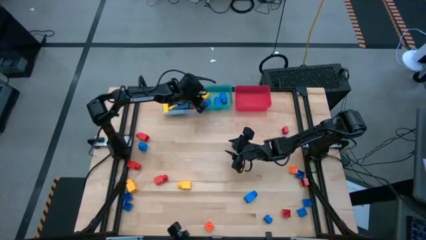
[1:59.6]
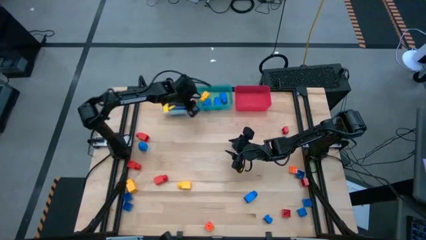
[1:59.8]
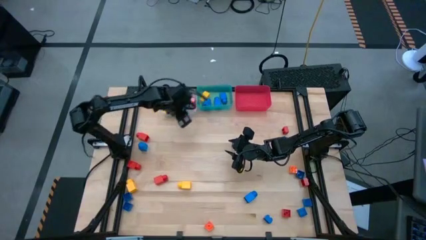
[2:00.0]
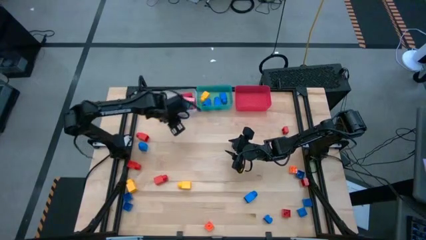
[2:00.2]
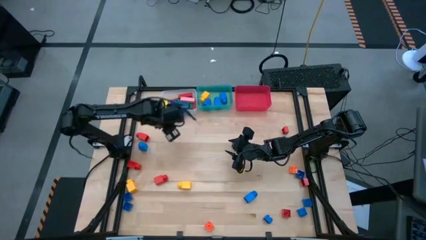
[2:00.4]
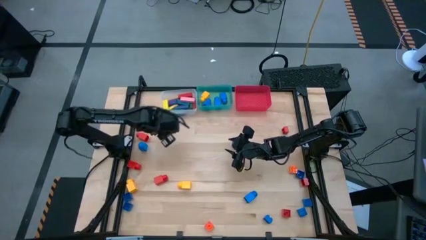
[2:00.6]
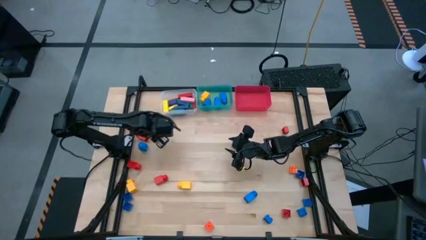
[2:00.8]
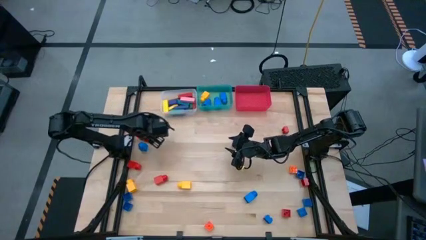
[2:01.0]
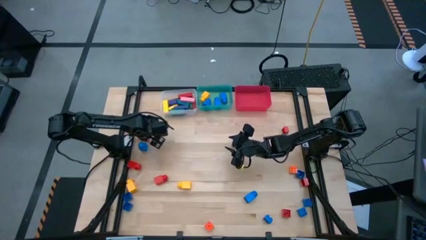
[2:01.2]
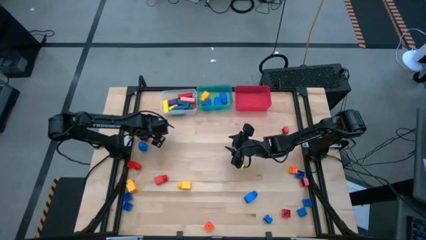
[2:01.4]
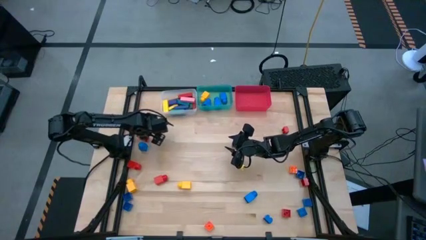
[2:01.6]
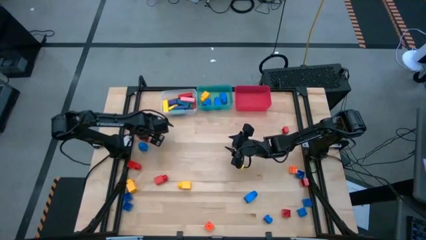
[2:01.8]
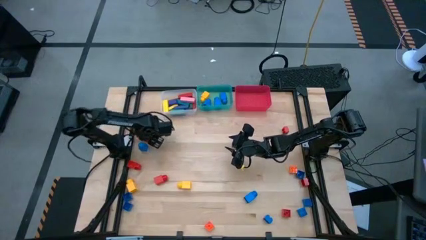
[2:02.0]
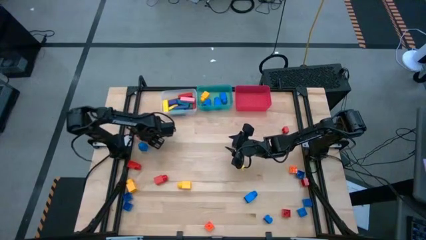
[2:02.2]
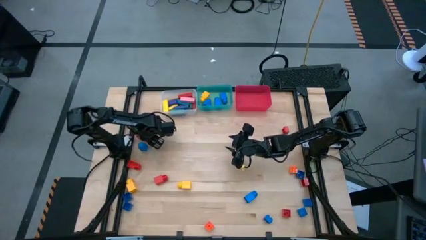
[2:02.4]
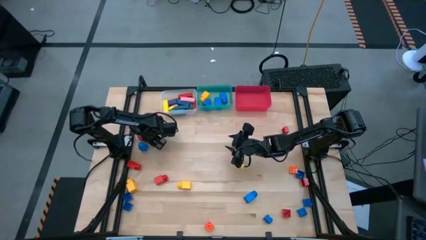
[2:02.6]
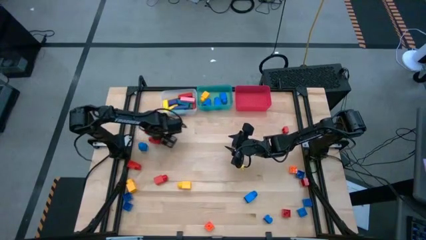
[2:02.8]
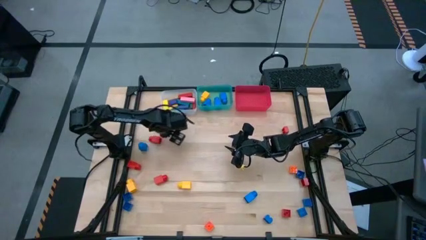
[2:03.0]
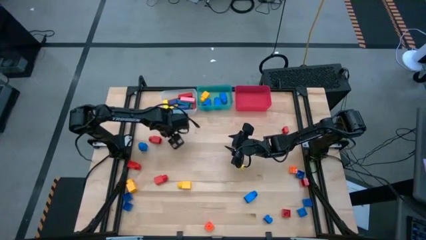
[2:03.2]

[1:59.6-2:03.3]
Task: Sort blocks by size
Put the red 1 stud game piece into the green bin

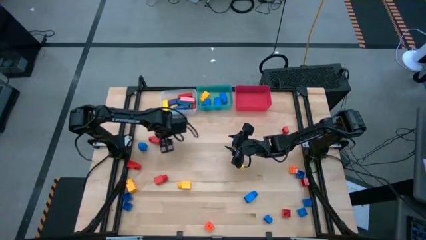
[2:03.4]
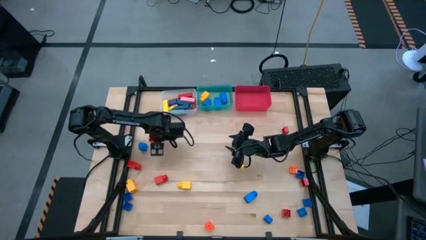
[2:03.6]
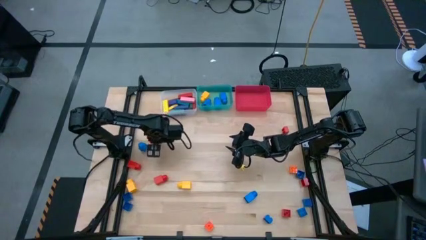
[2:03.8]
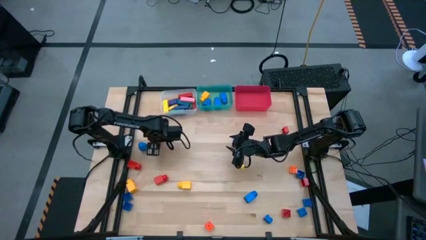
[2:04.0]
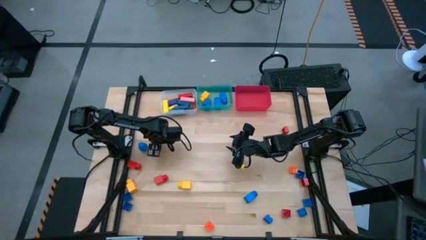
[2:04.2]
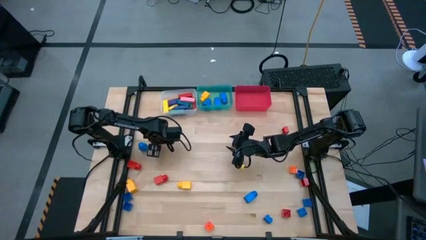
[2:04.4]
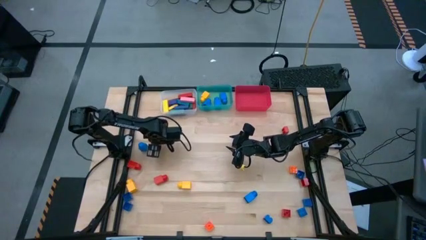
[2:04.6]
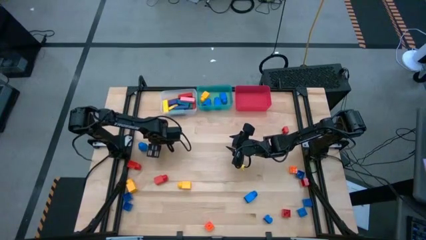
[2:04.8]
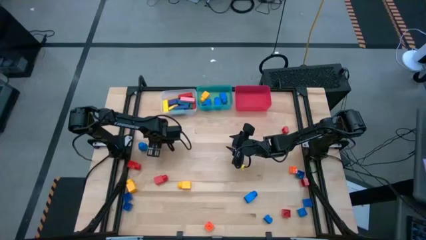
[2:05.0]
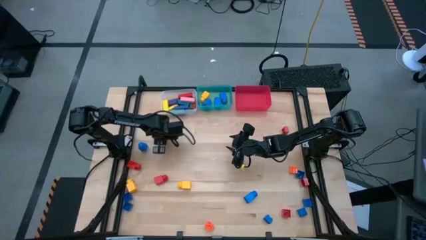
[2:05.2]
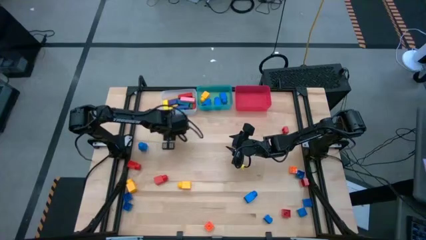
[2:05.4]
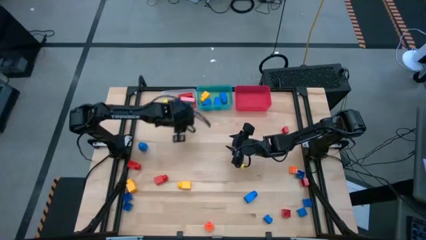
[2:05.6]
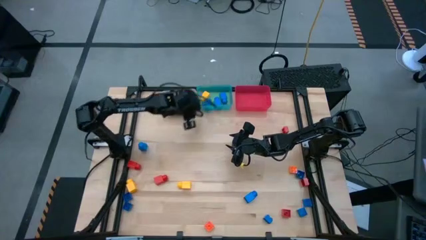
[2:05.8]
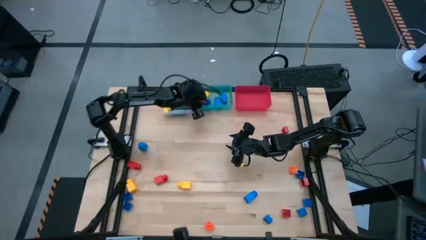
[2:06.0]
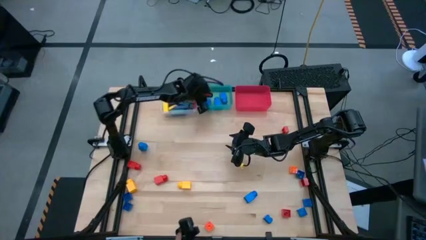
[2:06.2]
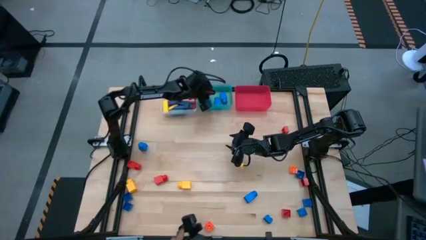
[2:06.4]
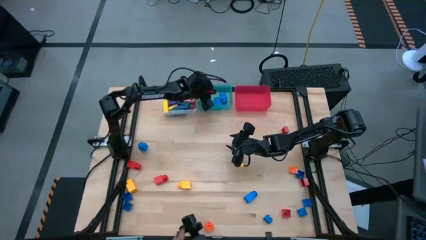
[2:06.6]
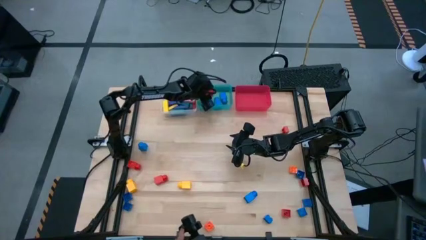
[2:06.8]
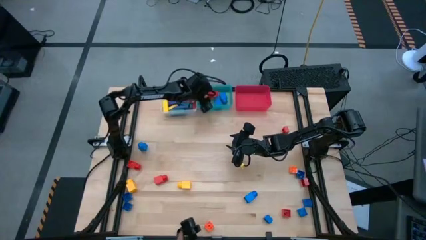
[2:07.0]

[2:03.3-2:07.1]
Put the red 1 stud game piece into the green bin

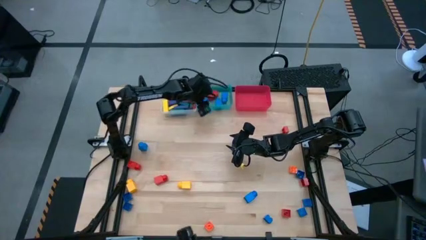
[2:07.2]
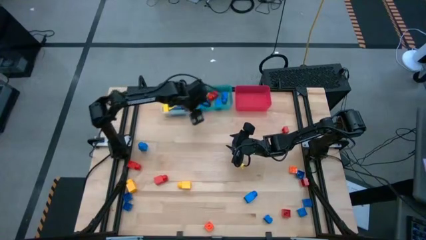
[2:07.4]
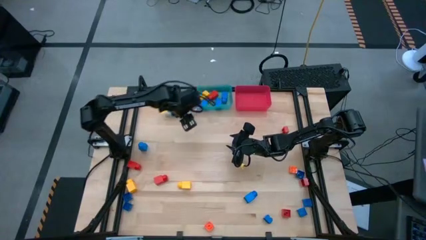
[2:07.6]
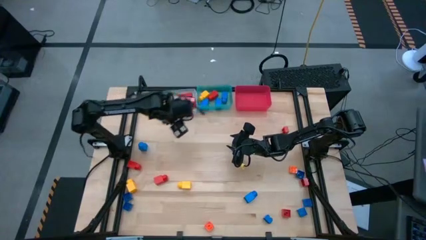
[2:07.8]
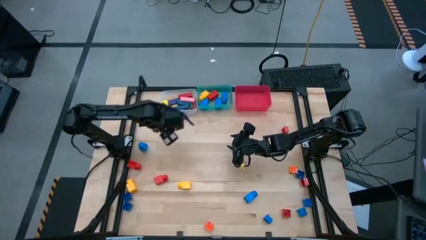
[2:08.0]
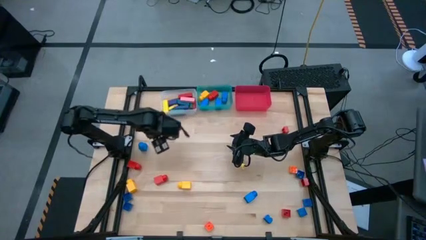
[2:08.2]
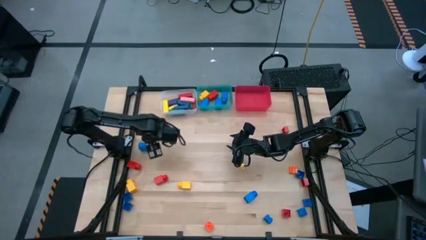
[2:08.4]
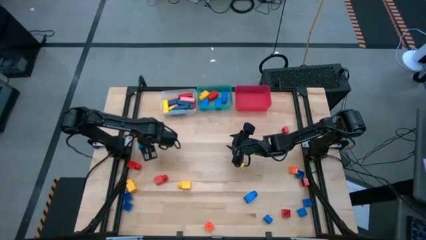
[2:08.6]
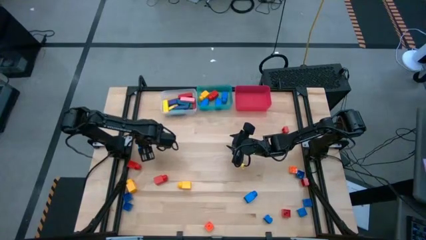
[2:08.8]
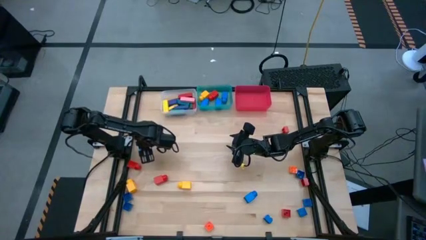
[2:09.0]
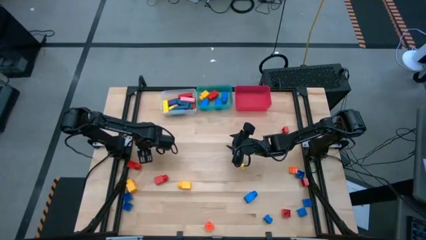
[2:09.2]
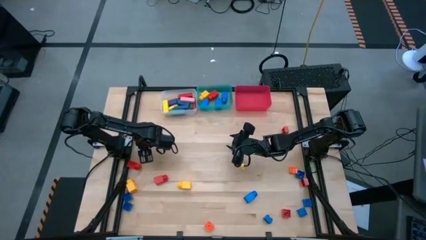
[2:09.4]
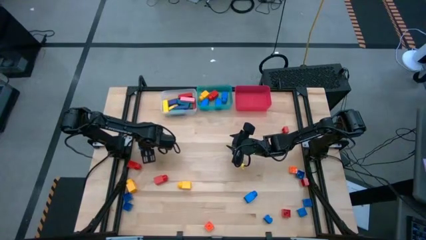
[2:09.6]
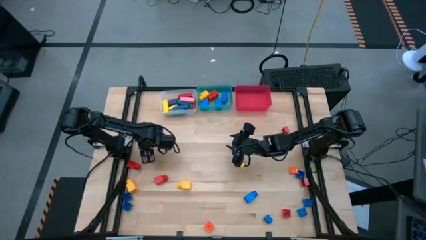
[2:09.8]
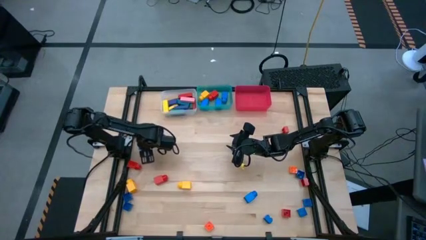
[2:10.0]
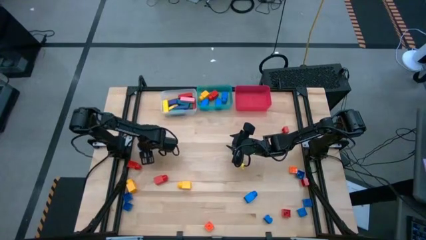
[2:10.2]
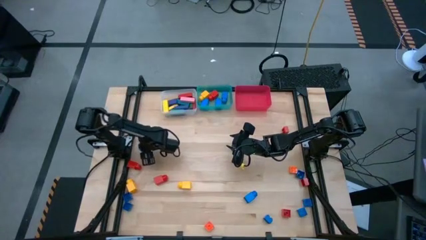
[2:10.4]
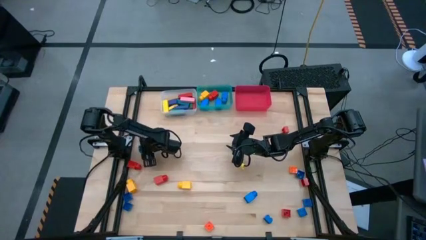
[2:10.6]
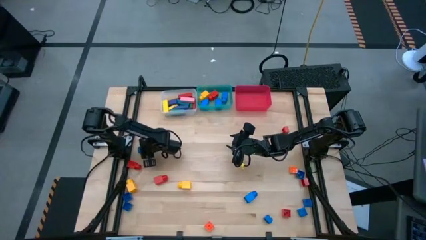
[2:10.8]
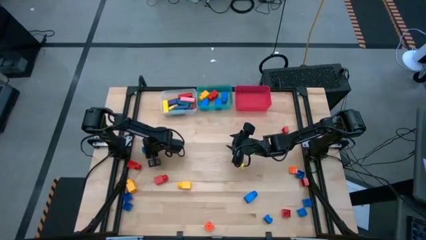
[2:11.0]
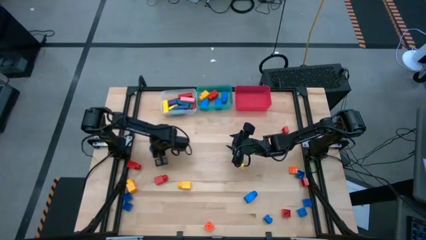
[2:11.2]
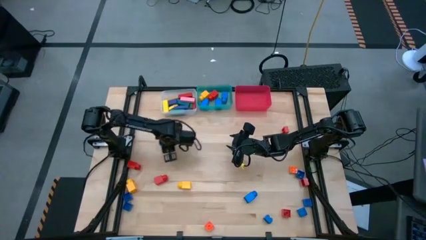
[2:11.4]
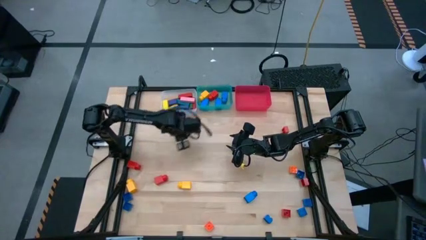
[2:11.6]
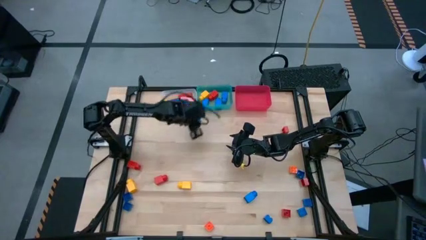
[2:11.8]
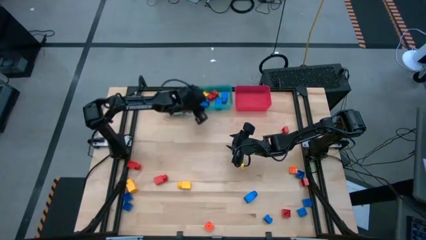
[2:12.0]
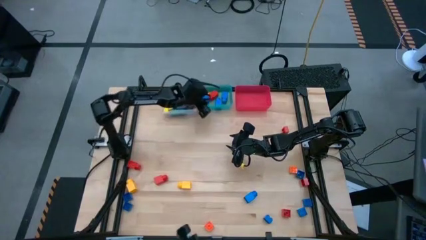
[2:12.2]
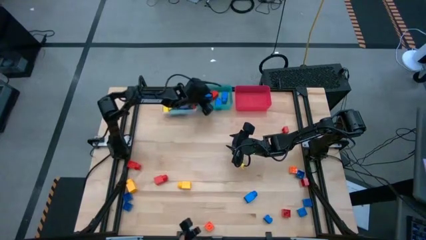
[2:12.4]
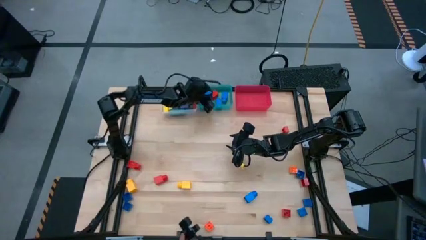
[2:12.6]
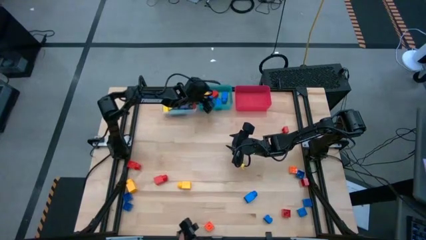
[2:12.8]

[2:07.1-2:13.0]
Put the blue 1 stud game piece into the green bin

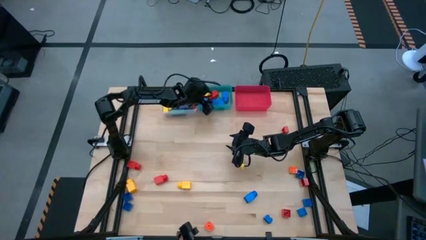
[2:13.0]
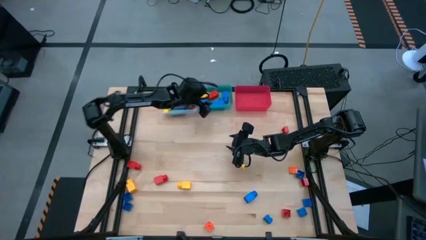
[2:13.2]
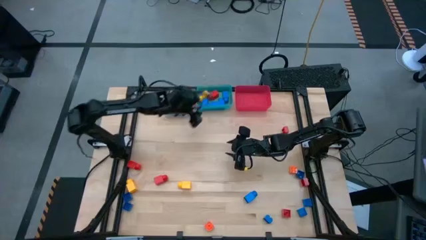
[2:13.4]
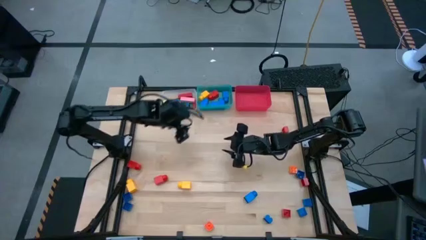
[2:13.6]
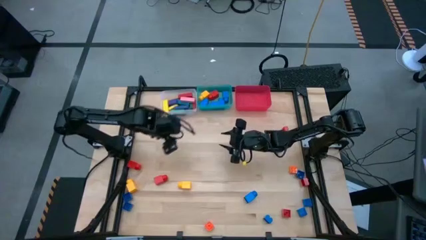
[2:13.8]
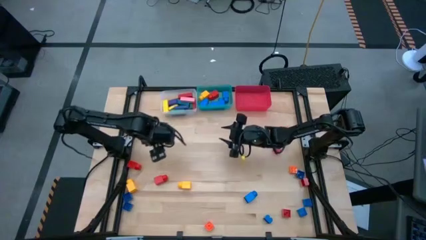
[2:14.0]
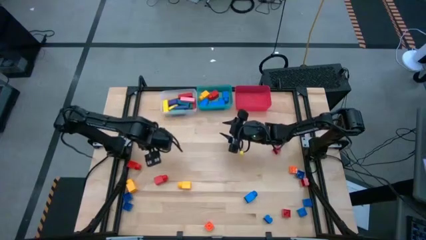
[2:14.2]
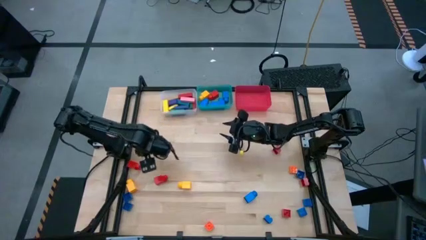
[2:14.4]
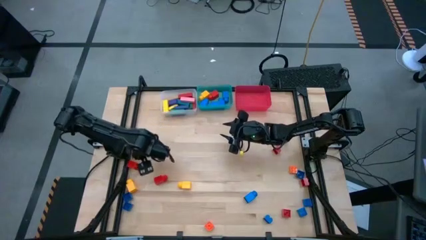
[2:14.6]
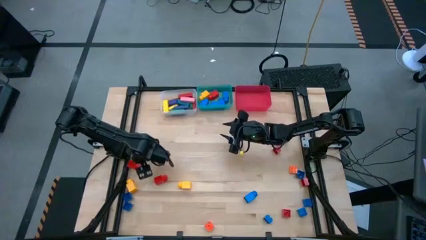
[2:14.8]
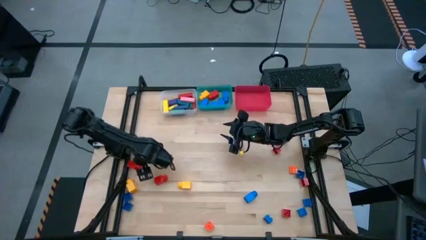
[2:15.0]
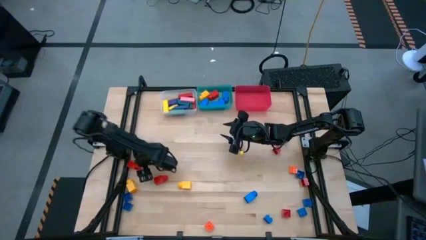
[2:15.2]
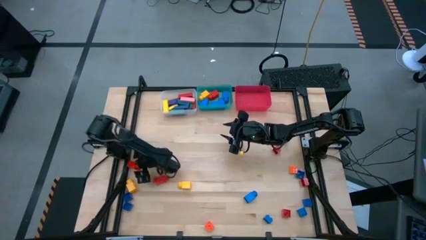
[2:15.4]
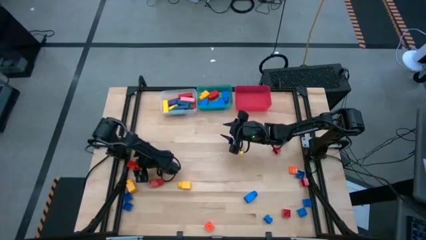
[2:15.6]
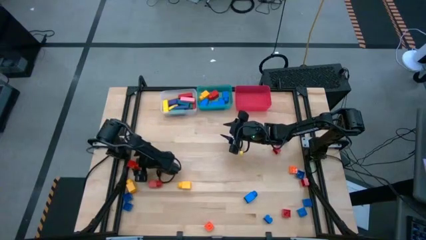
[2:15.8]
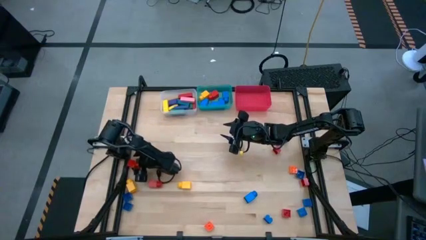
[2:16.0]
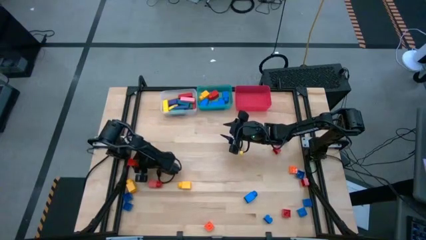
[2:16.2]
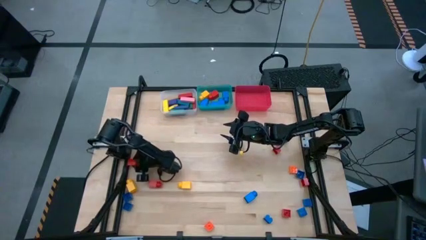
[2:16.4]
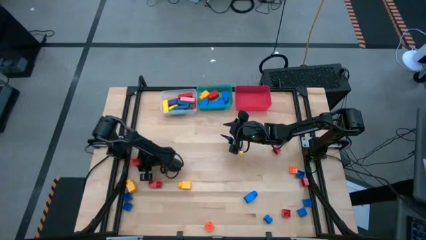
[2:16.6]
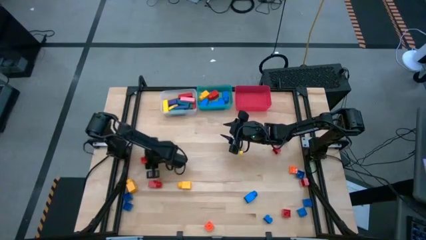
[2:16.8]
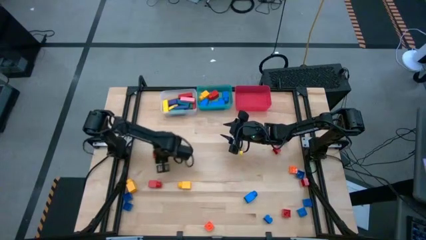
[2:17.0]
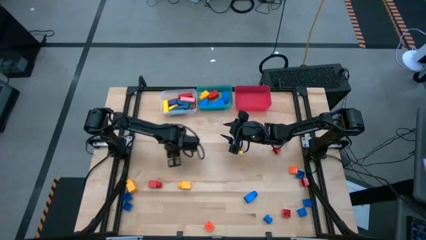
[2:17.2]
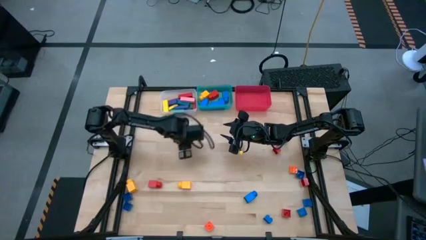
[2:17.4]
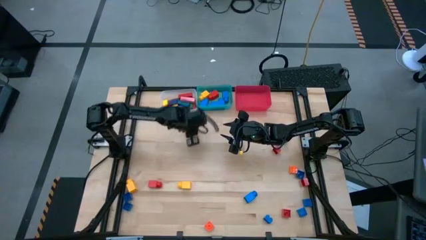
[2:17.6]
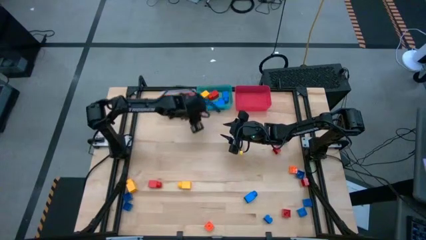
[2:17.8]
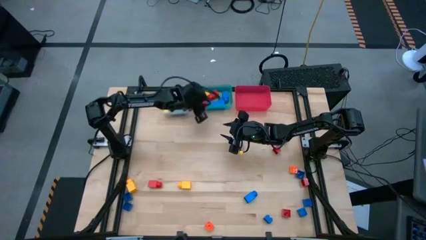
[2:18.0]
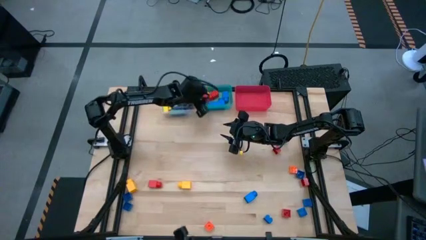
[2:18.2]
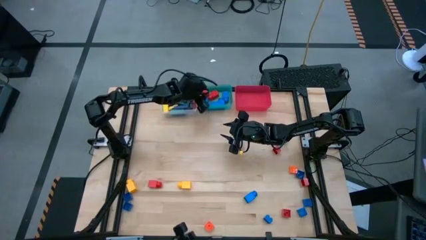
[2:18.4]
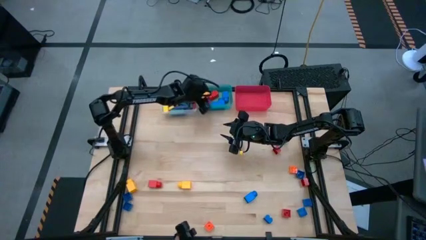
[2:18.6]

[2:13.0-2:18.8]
Put the red 1 stud game piece into the green bin
